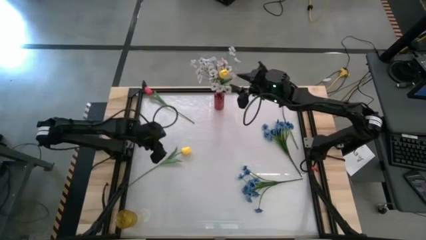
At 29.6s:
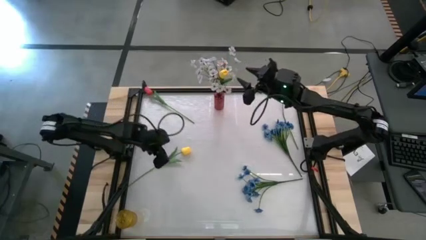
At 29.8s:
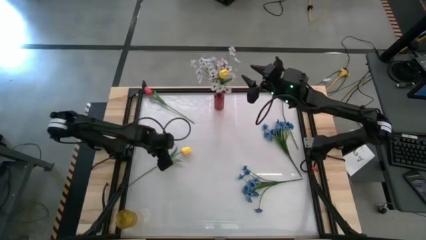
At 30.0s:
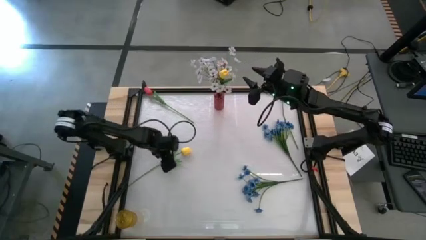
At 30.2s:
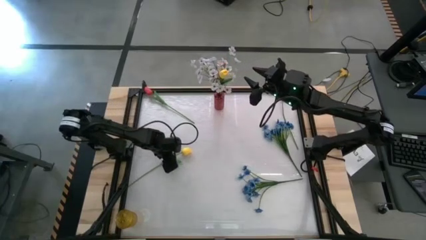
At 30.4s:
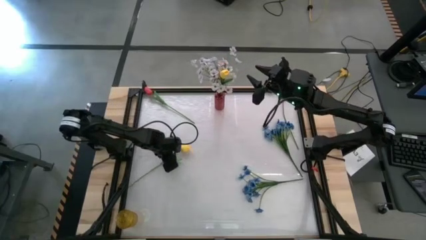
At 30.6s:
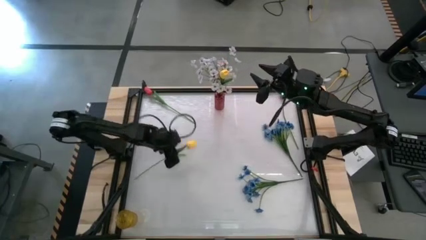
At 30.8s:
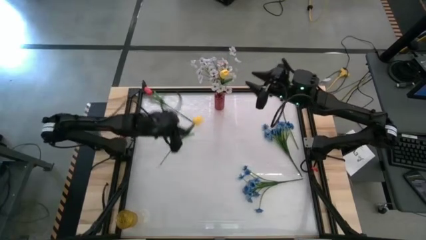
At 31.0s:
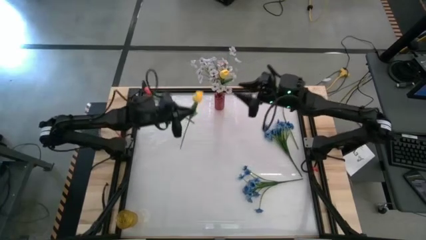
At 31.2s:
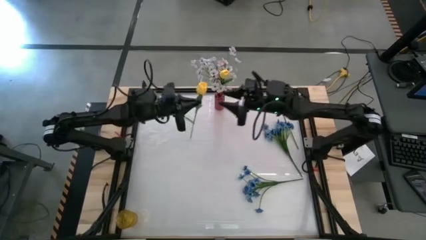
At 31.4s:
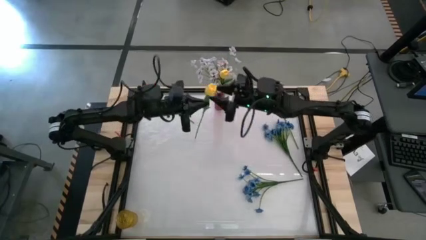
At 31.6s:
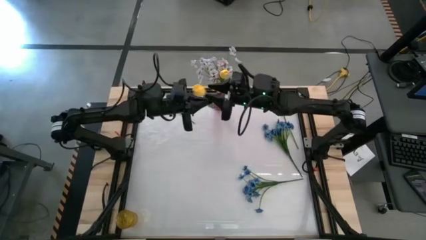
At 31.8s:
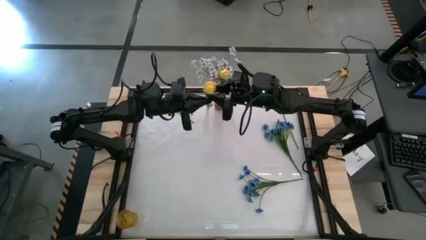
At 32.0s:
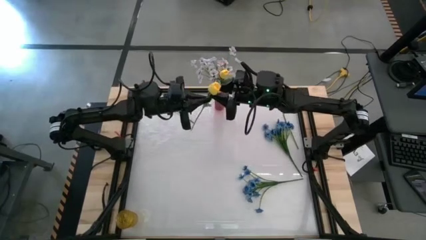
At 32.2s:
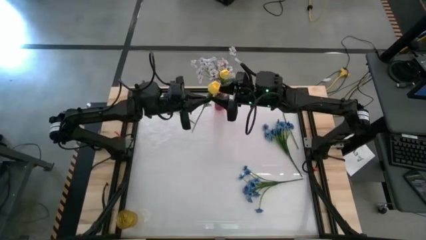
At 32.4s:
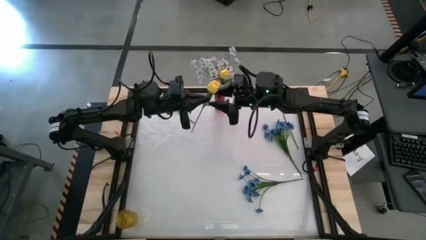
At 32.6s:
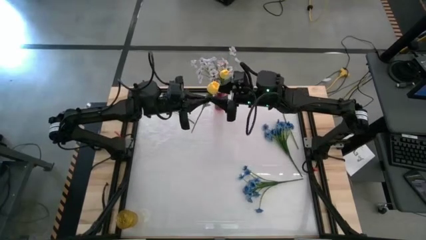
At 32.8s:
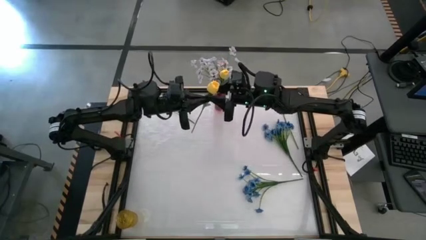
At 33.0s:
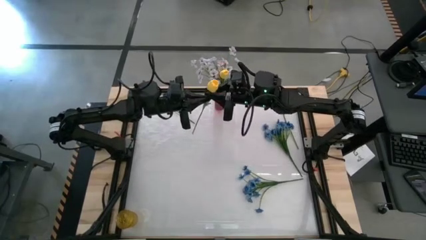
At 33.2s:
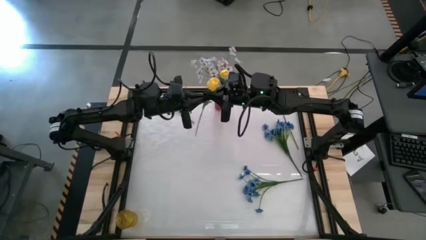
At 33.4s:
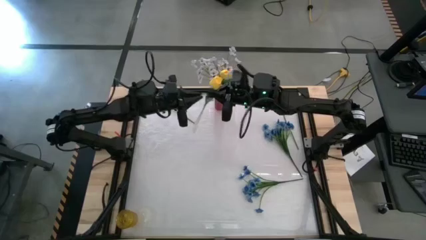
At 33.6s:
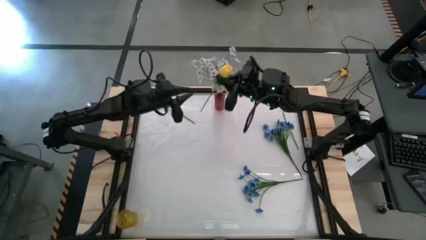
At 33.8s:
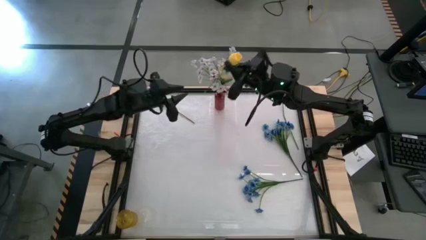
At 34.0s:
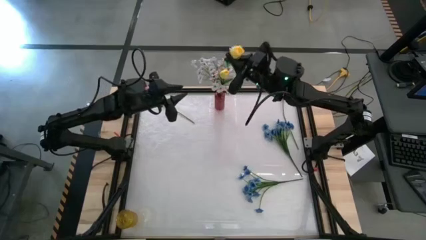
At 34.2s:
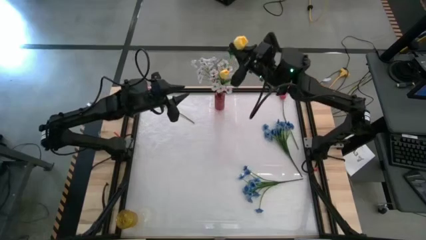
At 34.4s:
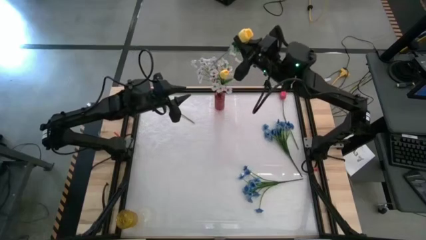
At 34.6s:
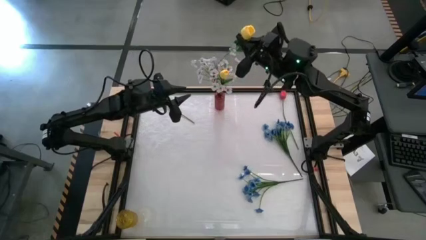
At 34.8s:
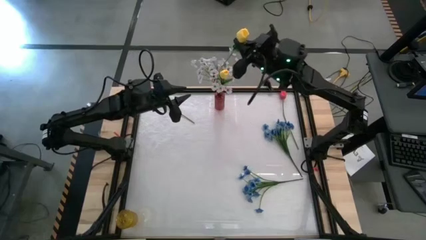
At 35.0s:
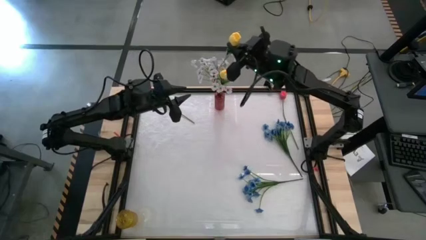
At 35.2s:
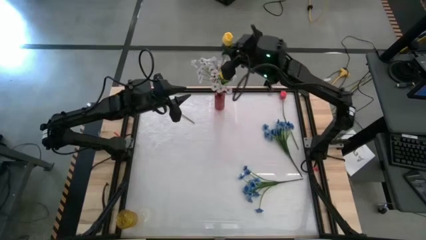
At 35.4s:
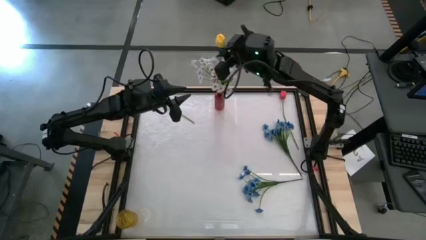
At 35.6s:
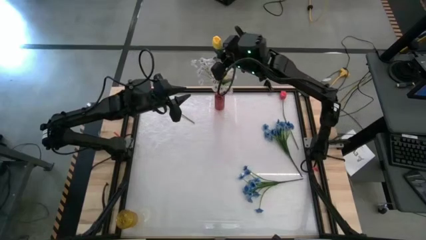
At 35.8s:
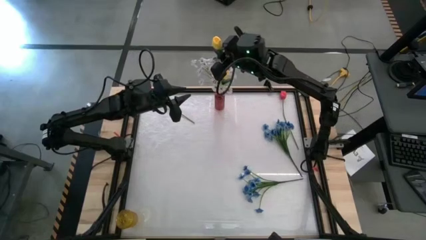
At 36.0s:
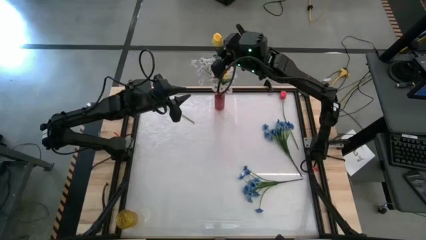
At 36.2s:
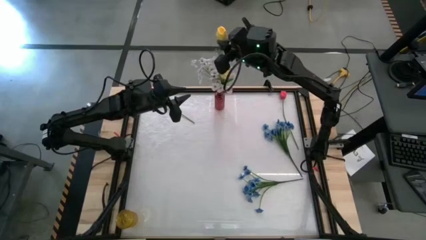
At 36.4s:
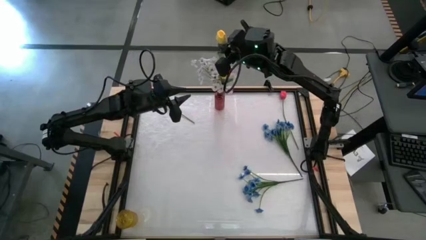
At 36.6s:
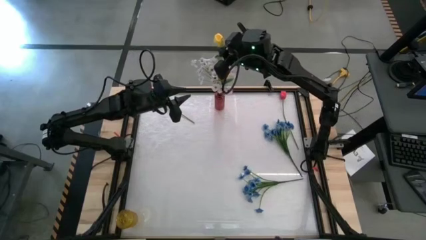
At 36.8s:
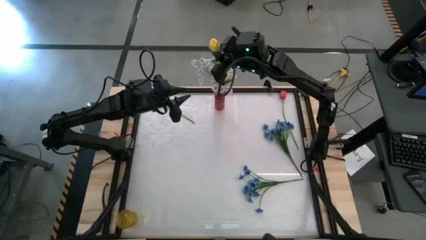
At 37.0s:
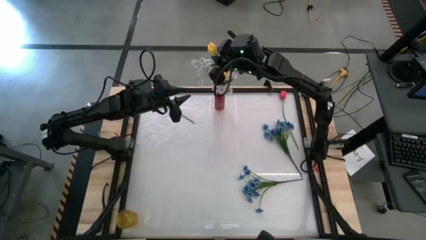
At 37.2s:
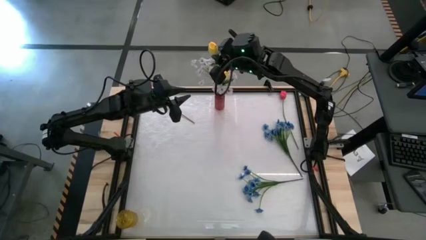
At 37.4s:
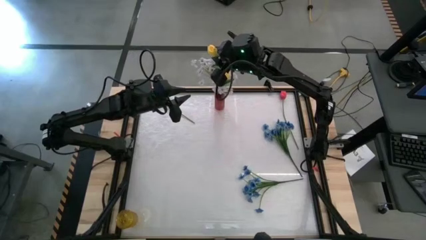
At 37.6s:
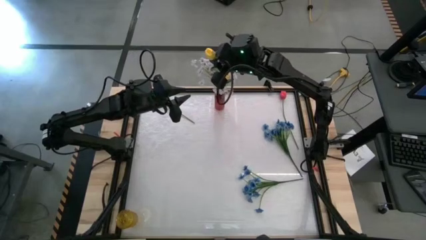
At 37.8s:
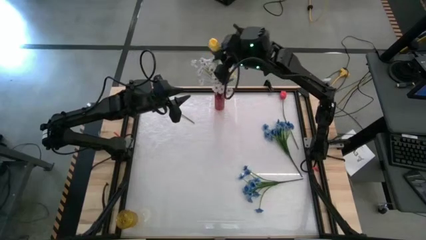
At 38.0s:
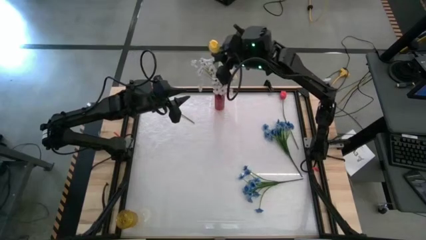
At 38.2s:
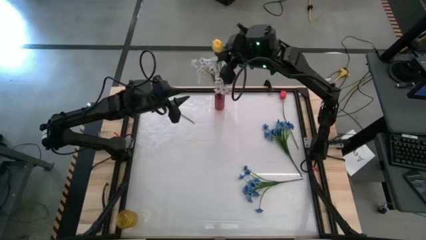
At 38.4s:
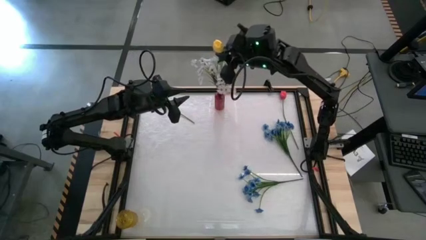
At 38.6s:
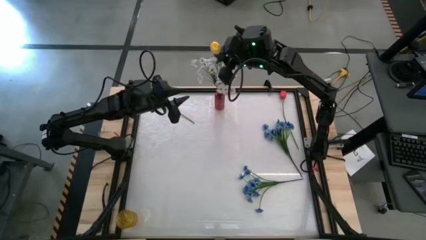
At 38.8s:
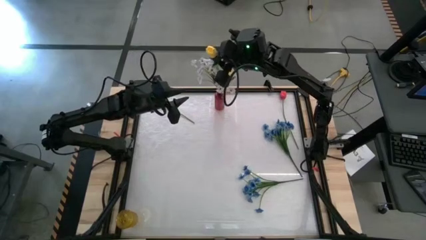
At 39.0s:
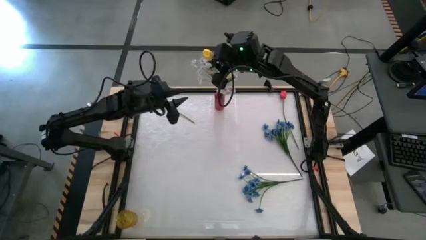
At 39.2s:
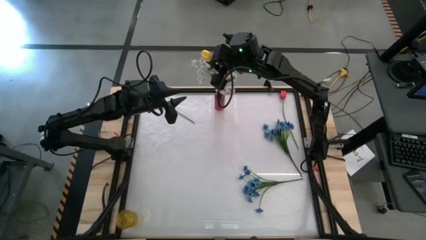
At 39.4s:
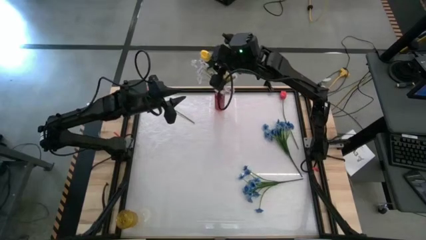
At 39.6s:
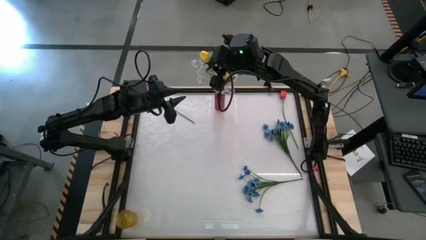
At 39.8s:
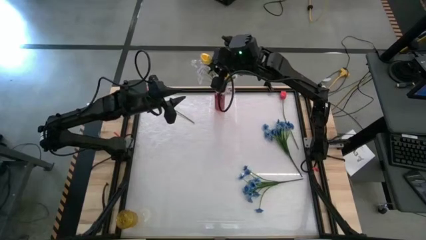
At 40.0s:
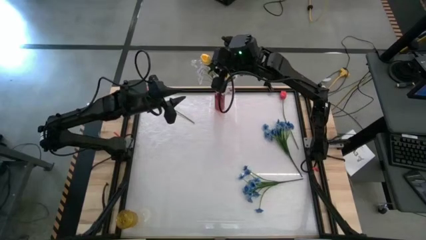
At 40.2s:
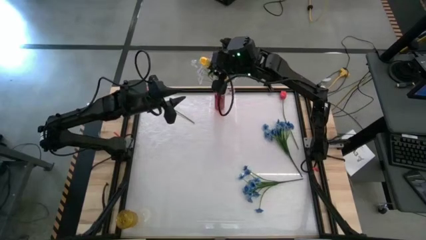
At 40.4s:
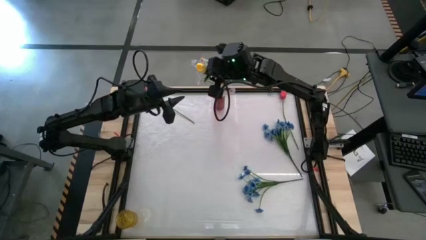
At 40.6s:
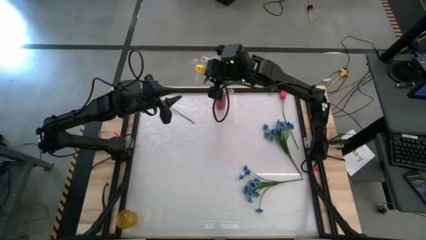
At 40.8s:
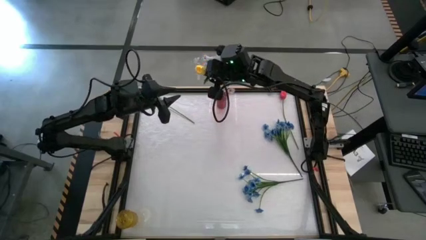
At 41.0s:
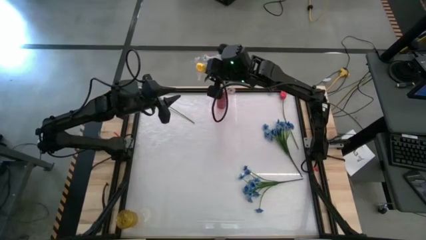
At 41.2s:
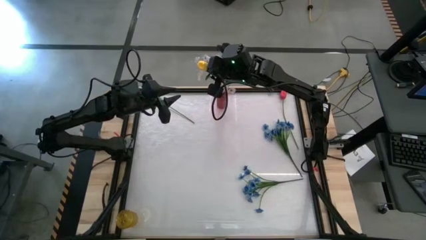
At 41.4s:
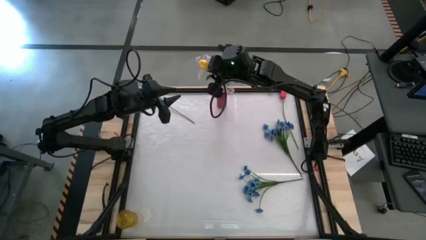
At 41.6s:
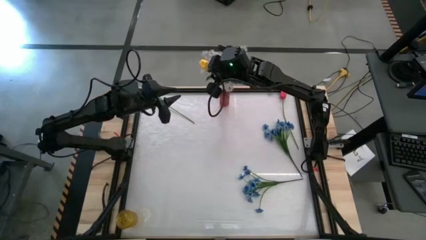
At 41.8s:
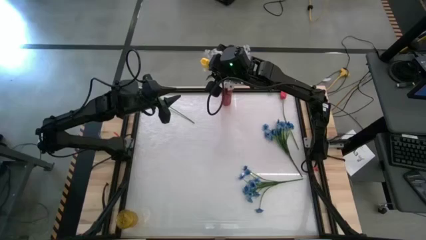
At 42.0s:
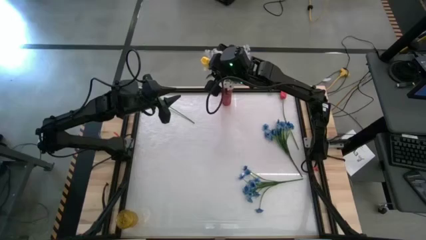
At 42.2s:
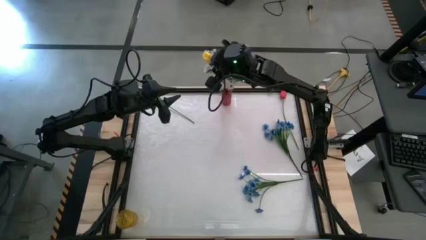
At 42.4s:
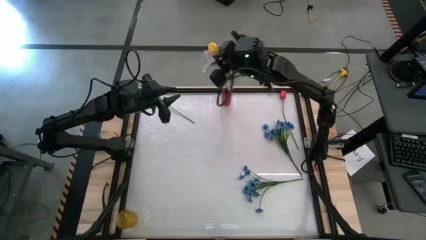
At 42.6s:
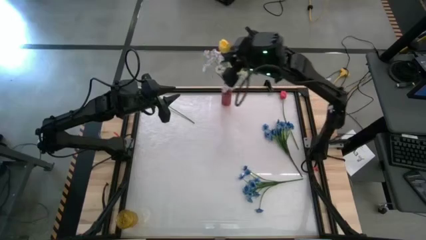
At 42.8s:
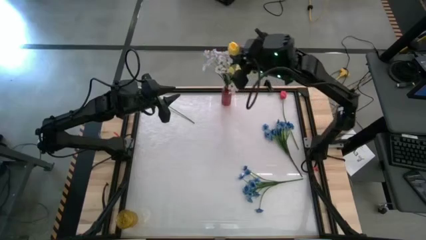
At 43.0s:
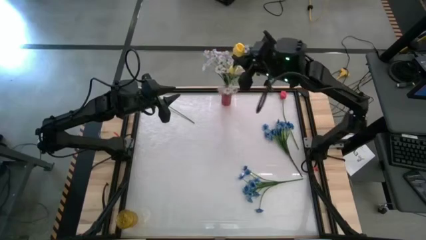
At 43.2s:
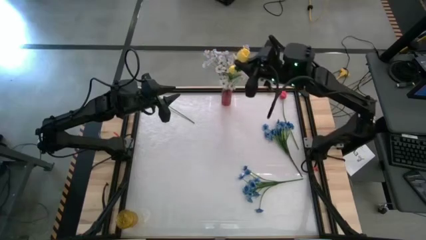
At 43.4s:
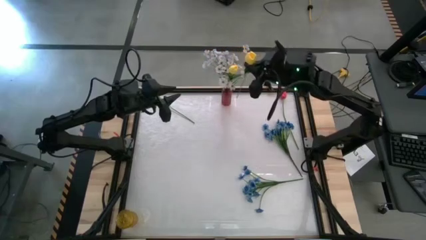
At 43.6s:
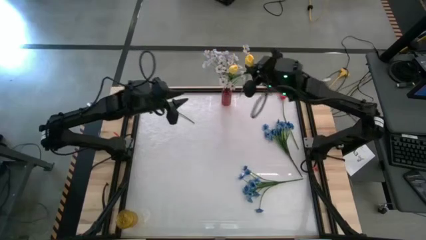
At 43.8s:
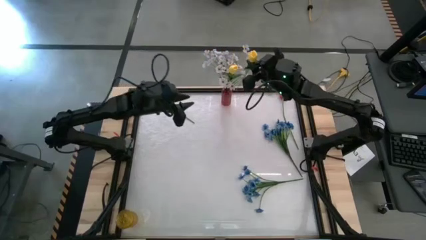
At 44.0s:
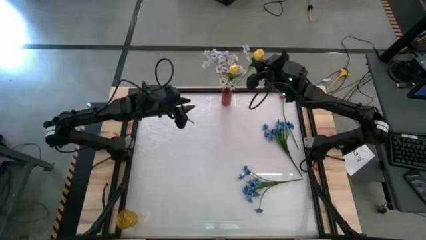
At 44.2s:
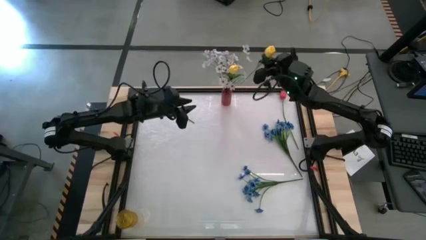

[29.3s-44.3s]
Task: Sort flowers into vase by color
Put the yellow flower into the red vase

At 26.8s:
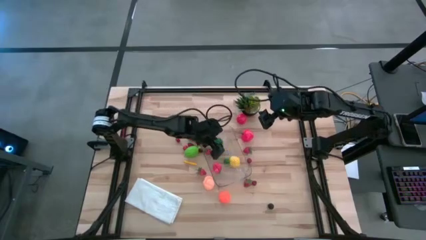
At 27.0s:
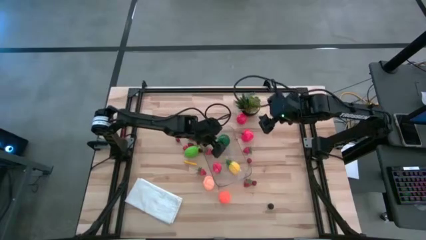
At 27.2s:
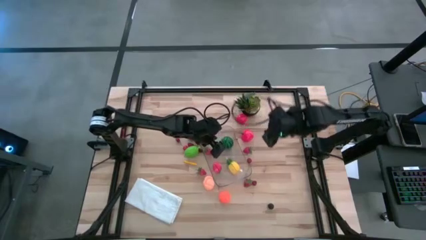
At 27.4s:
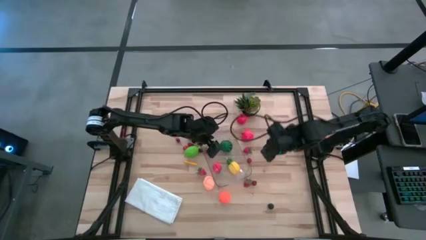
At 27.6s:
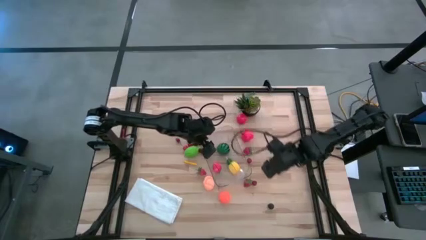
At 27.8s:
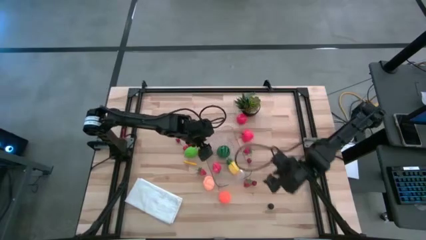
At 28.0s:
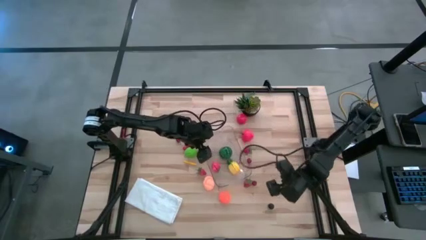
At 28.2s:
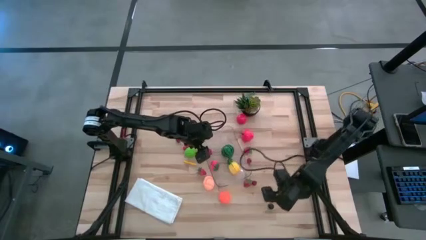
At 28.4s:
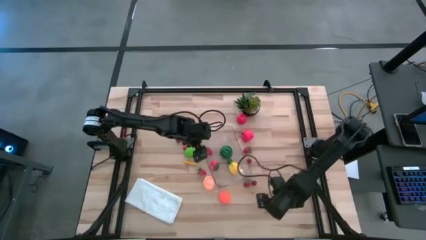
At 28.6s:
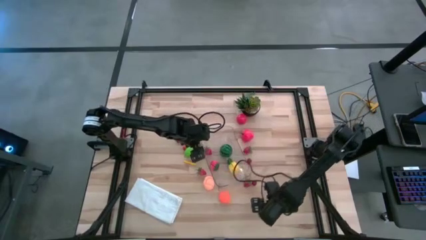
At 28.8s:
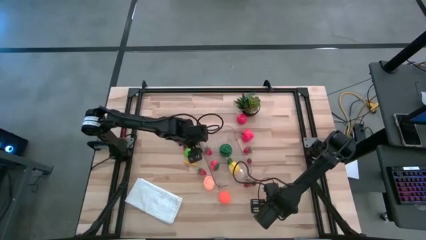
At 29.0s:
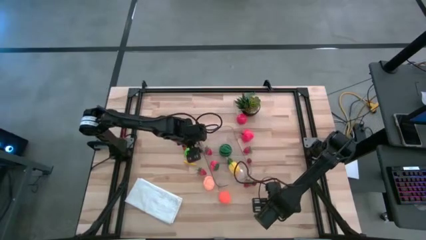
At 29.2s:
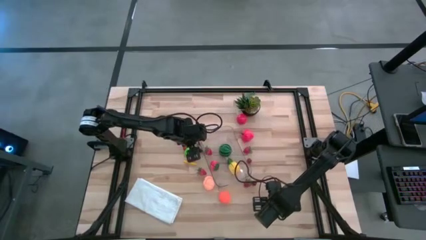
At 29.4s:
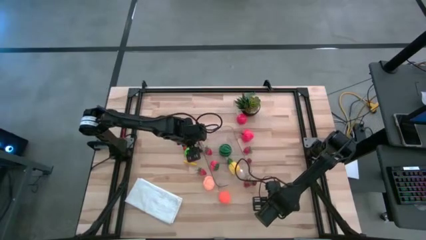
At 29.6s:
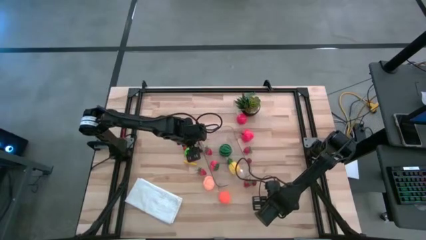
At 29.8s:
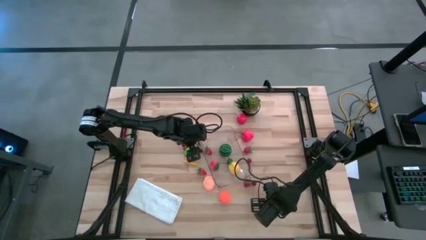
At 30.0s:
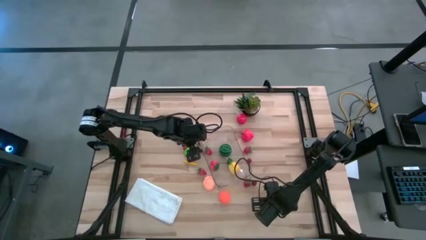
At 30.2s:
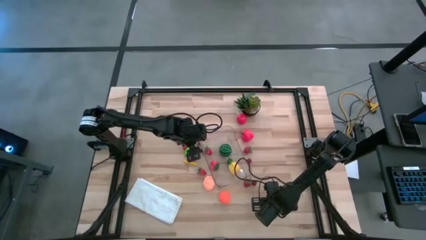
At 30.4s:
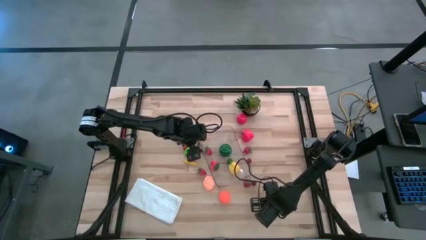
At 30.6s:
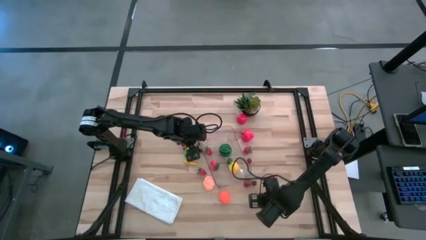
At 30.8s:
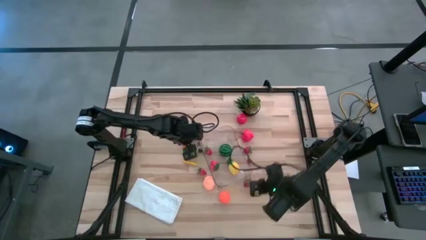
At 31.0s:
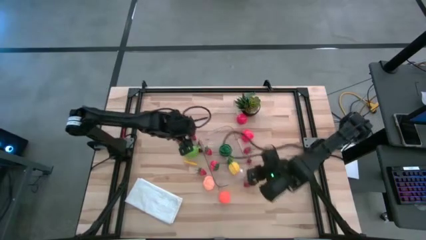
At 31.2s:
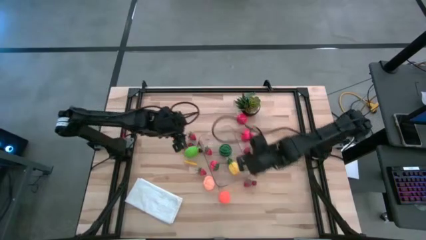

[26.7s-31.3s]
Task: Pick and placing Produce into tupperware
Put the black cherry into the transparent bin
